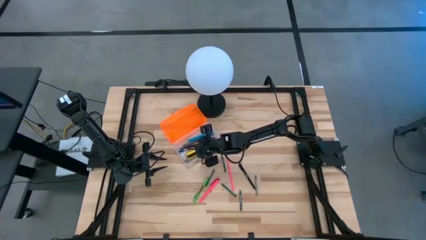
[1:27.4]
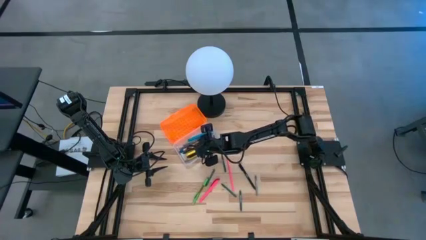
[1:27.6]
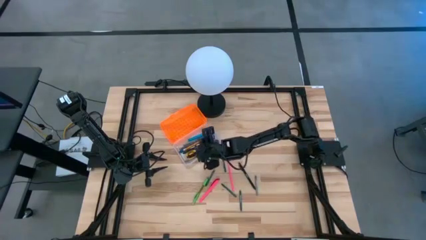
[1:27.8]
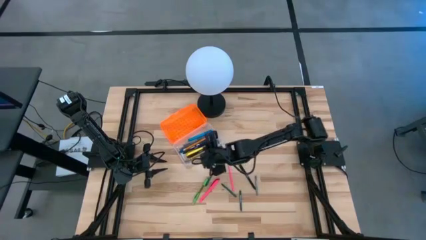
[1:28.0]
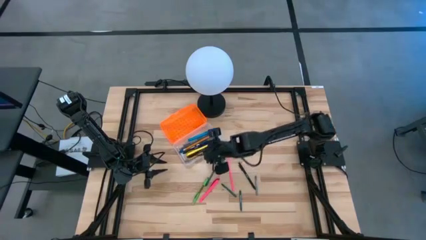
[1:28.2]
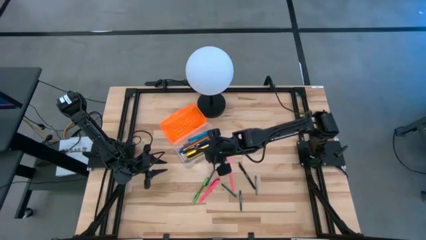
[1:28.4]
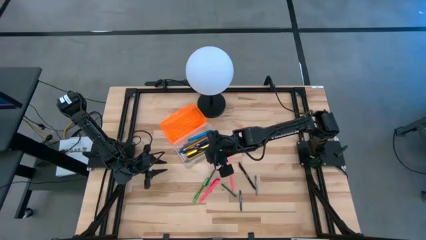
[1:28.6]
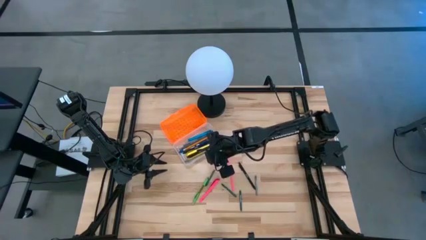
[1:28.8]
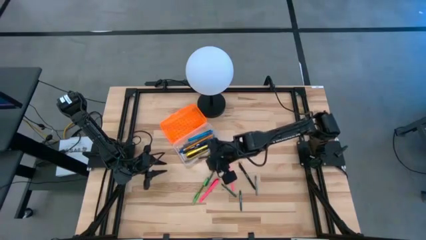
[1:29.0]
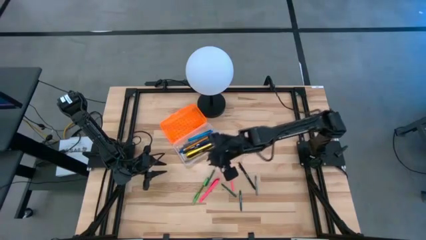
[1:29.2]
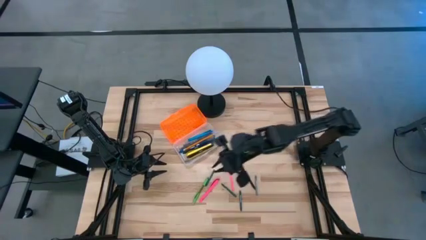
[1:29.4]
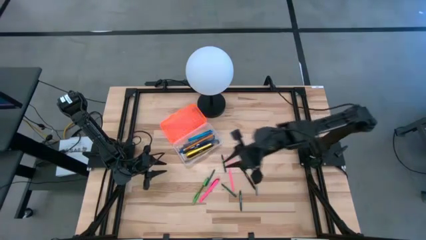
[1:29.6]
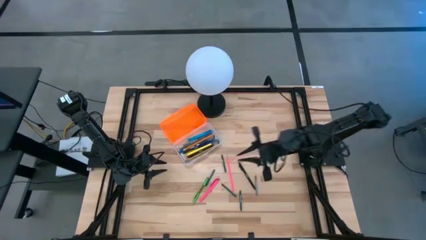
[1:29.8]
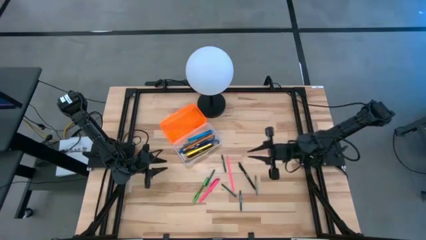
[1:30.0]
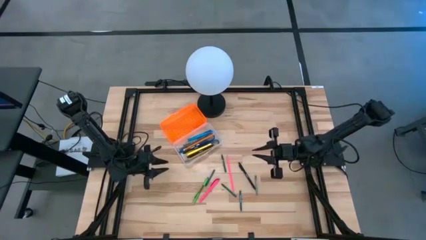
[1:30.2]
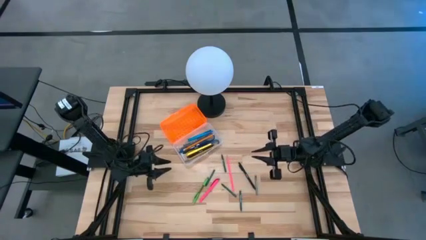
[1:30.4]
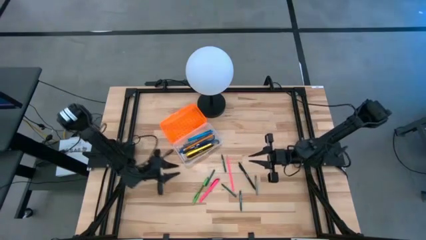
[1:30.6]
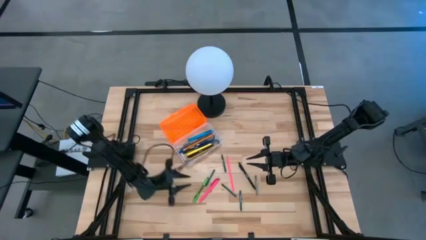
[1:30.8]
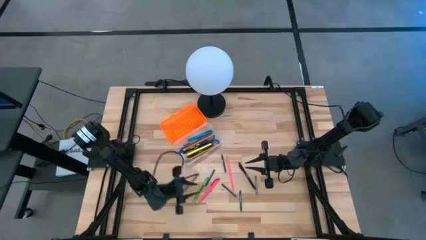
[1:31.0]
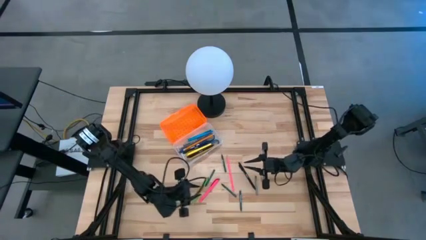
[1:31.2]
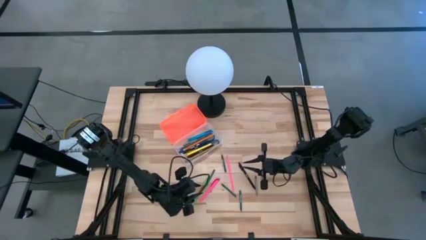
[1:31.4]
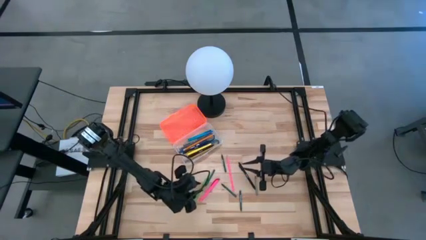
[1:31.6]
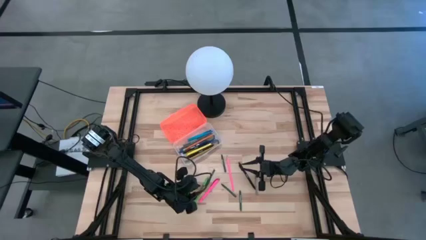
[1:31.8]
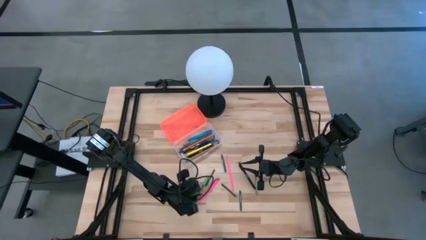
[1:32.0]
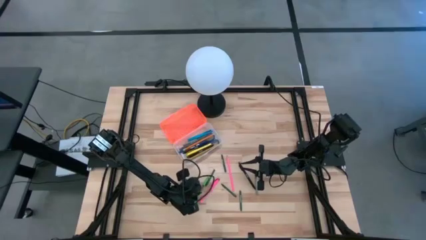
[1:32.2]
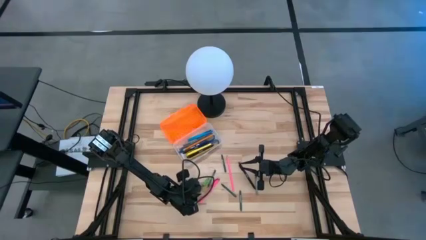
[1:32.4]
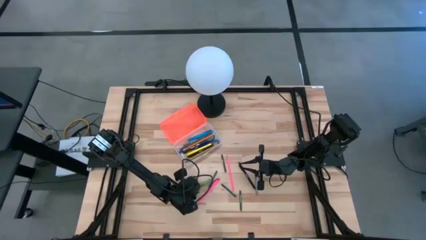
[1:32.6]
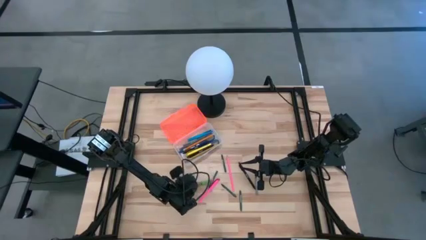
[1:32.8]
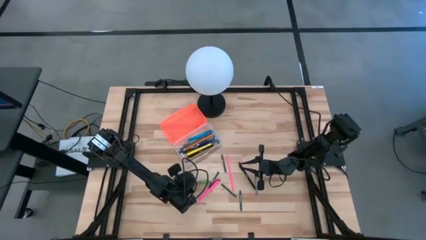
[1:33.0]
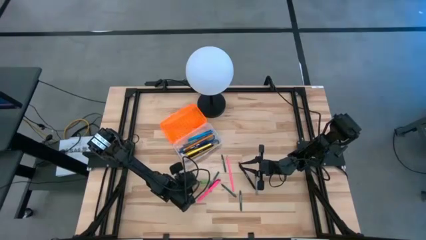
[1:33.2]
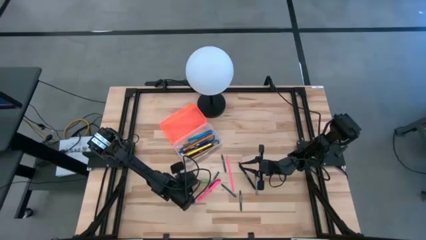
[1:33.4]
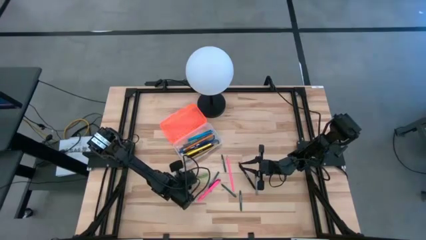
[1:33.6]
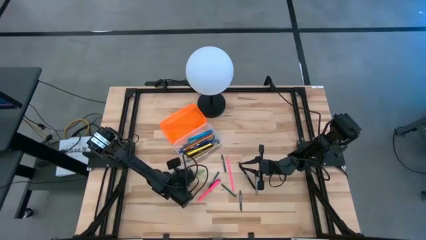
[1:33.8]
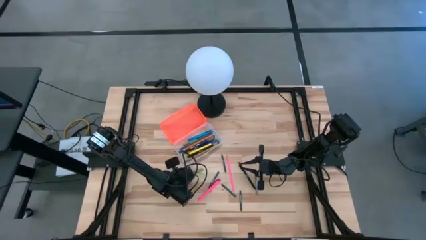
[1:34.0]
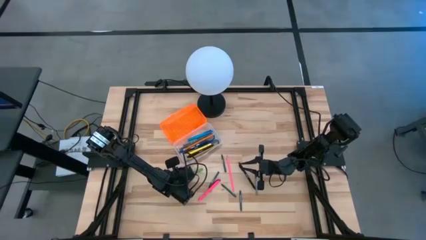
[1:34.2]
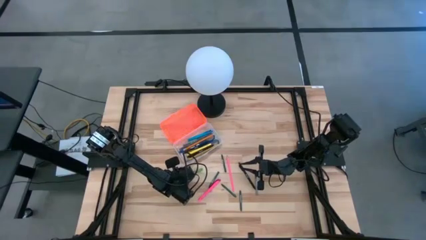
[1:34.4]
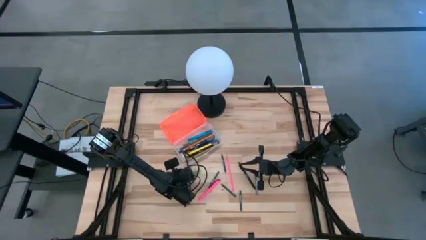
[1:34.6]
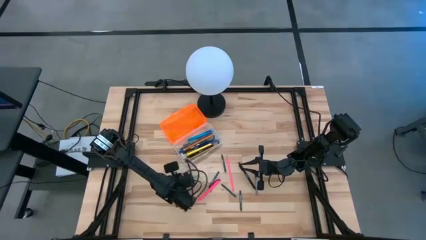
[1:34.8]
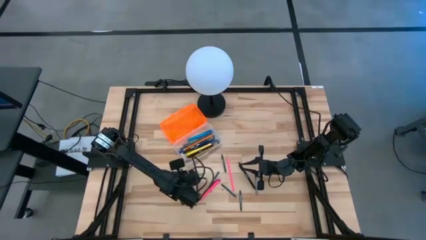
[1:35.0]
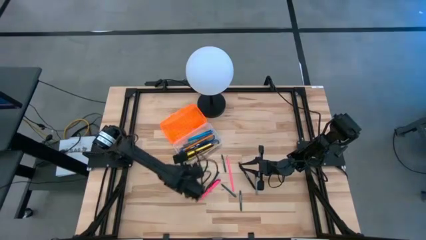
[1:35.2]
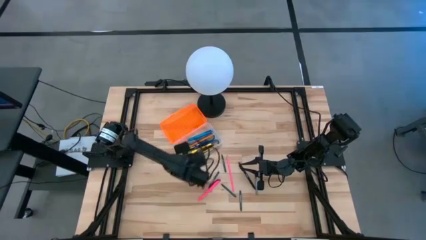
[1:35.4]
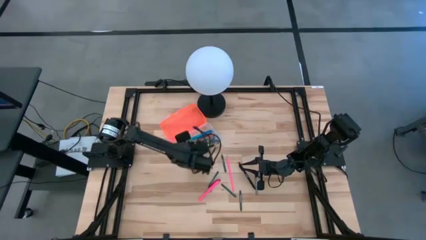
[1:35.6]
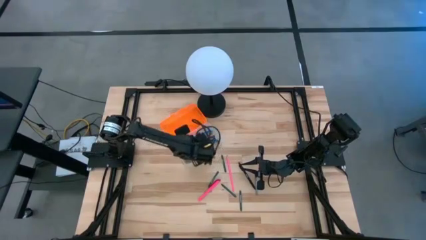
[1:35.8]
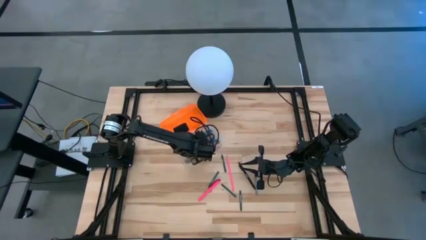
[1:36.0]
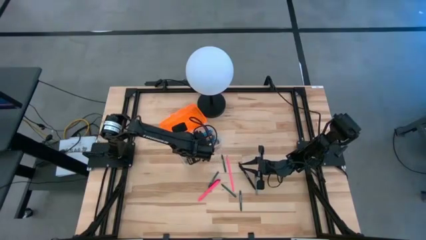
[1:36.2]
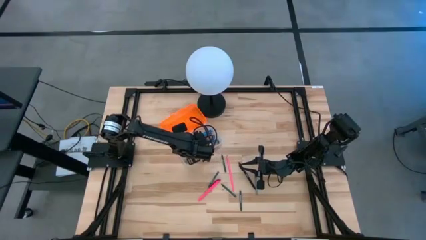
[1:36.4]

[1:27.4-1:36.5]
Task: Pick & place school supplies into a supply box
Put the green pen into the orange supply box

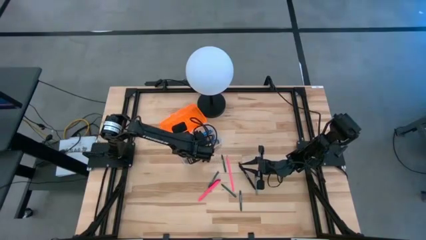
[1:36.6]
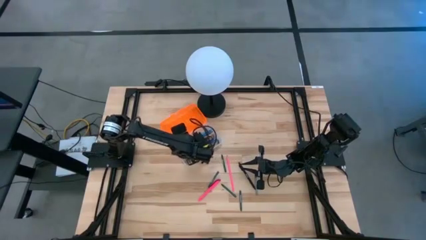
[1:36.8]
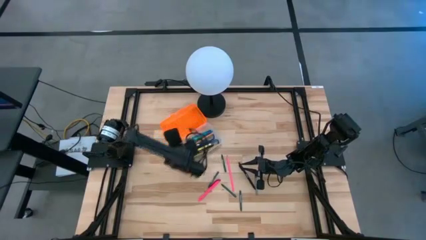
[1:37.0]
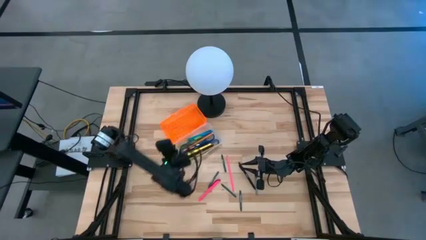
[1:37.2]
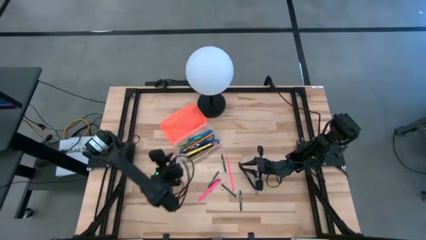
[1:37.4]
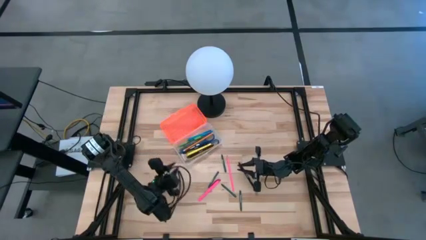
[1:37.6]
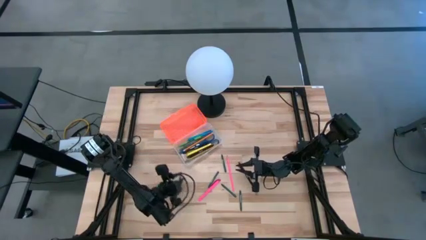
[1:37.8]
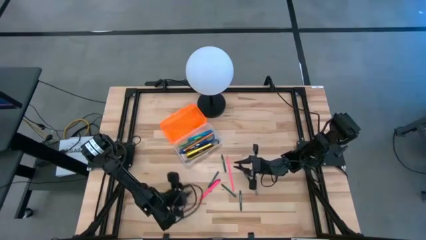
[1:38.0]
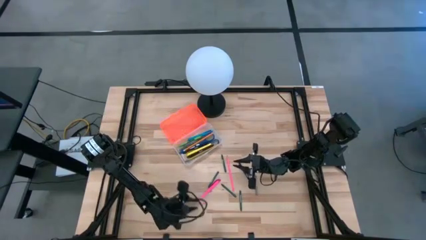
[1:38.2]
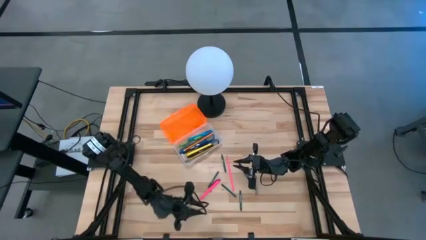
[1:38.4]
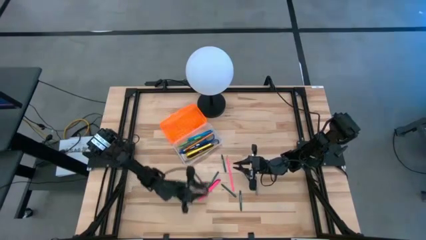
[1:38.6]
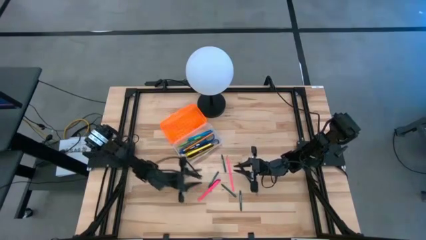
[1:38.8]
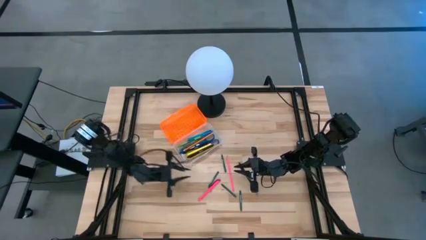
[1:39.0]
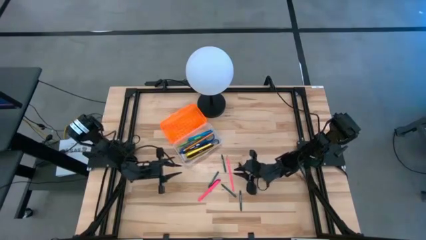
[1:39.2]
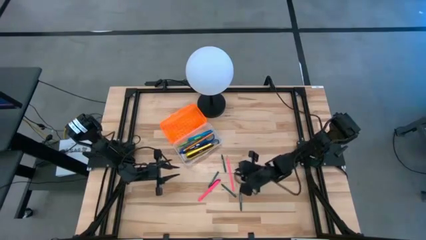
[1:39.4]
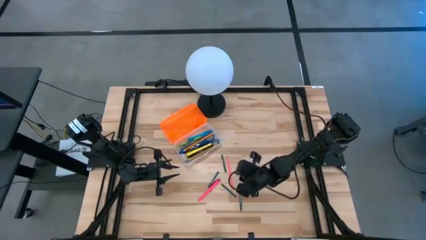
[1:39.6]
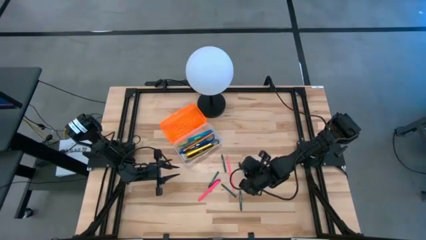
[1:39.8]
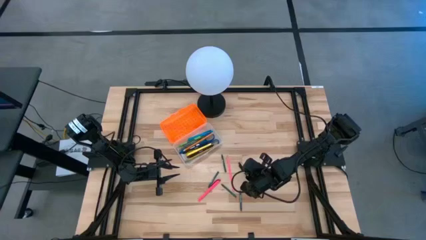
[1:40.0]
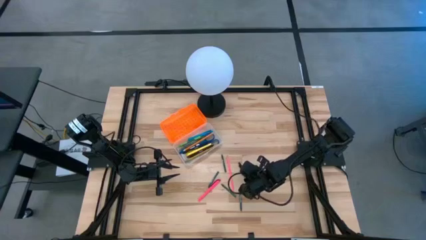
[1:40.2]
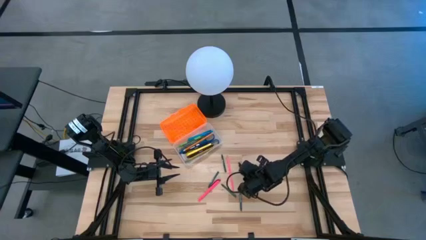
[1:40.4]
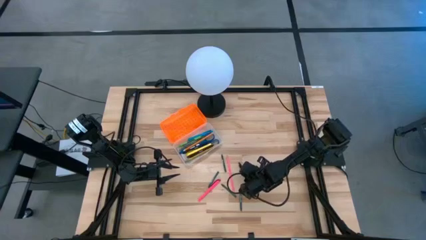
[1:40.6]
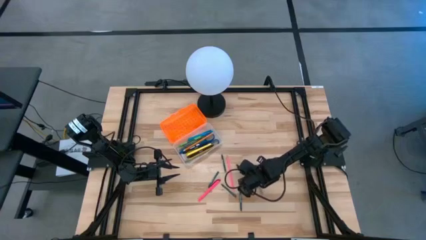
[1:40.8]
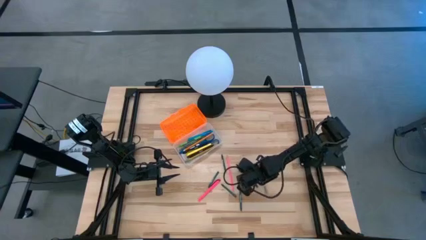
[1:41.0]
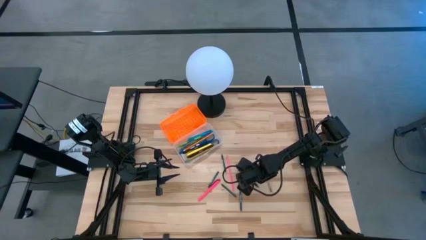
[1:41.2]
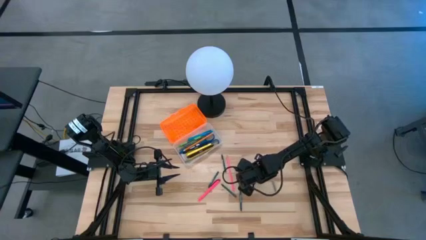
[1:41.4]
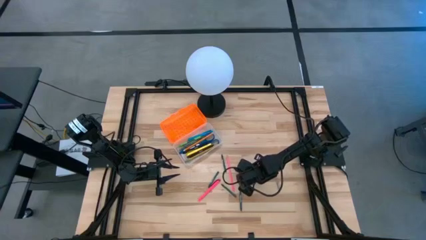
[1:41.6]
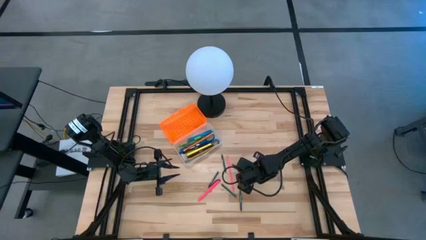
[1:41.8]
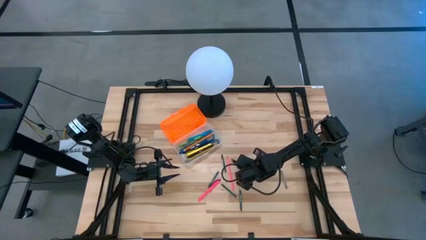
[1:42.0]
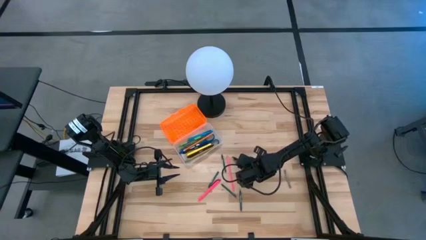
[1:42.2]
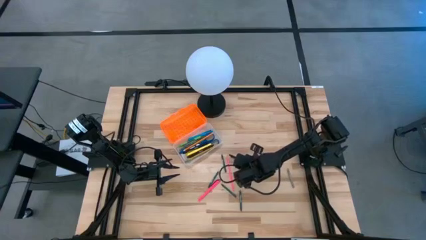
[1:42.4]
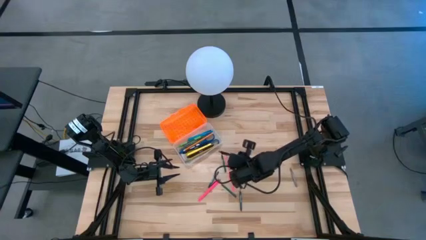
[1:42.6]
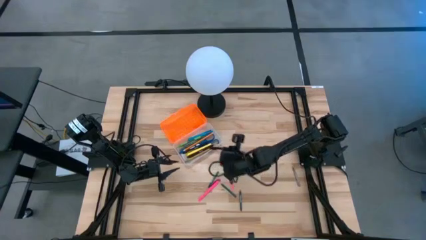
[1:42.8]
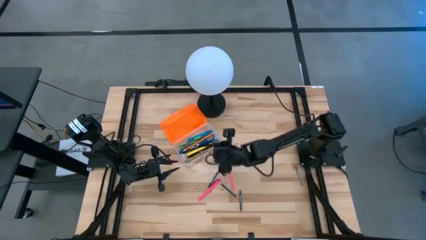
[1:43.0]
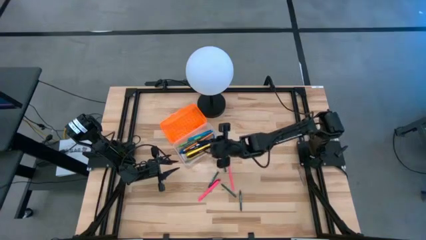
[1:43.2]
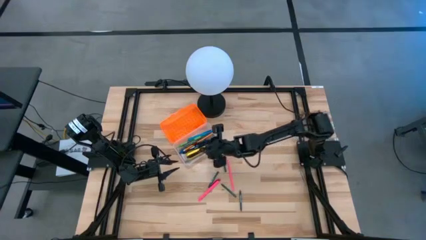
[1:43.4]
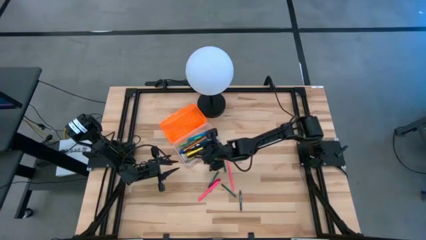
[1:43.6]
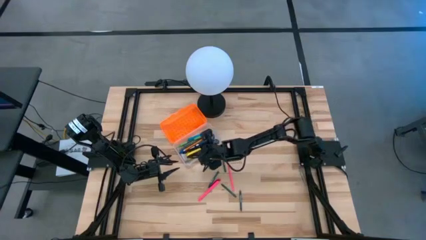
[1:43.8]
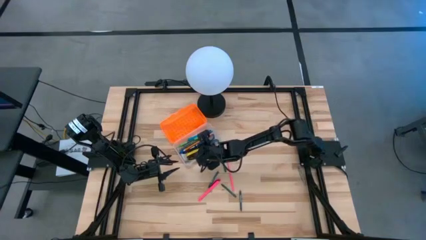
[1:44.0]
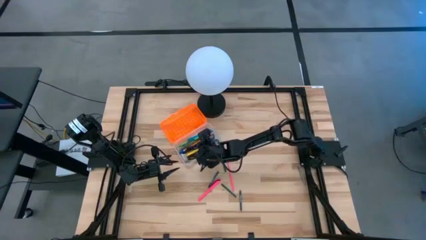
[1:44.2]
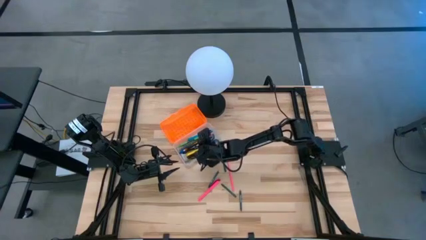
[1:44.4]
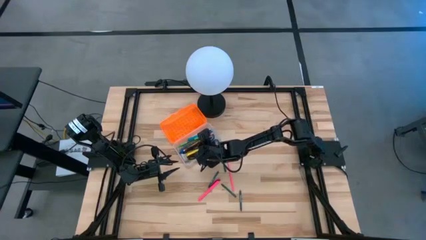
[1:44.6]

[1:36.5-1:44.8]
Put the black pen into the orange supply box
